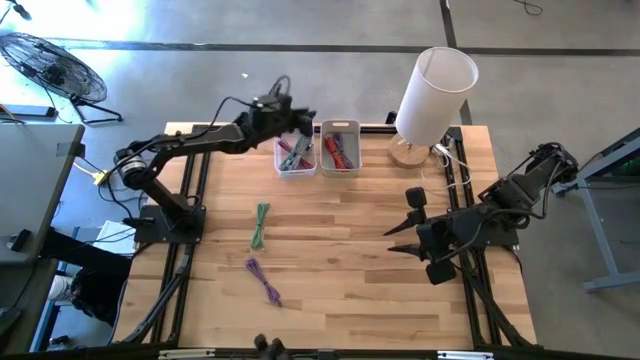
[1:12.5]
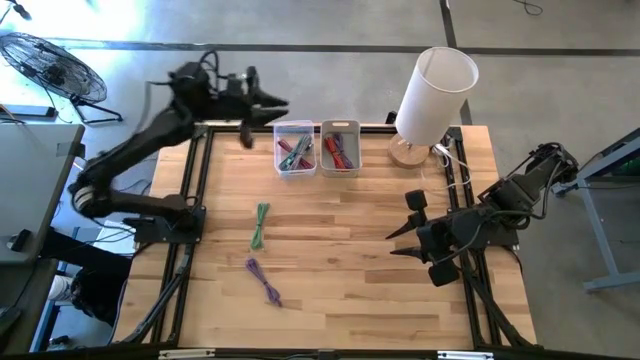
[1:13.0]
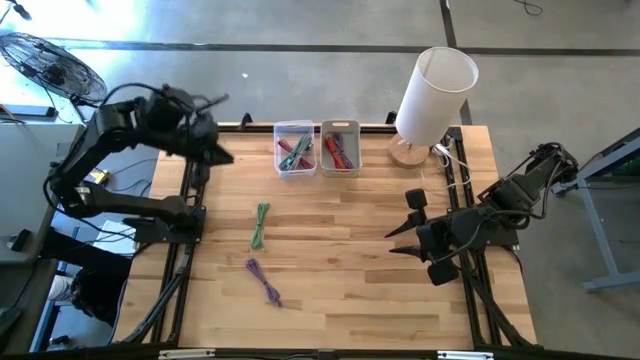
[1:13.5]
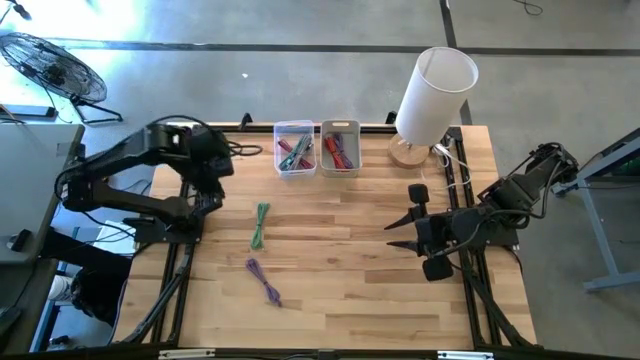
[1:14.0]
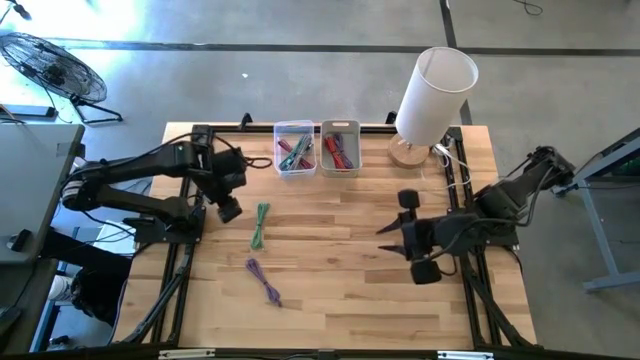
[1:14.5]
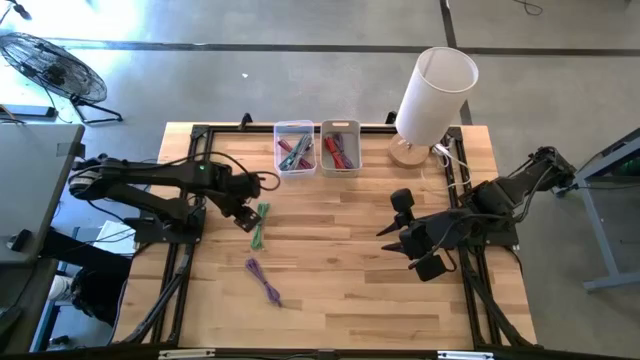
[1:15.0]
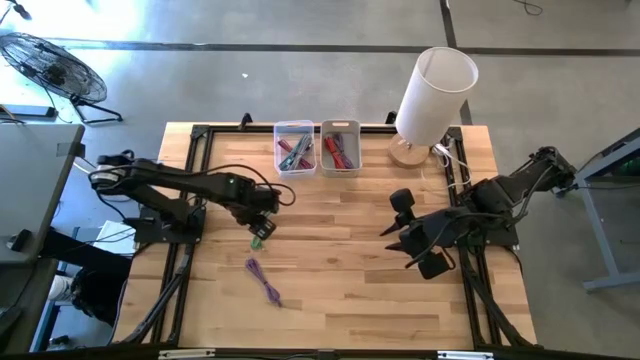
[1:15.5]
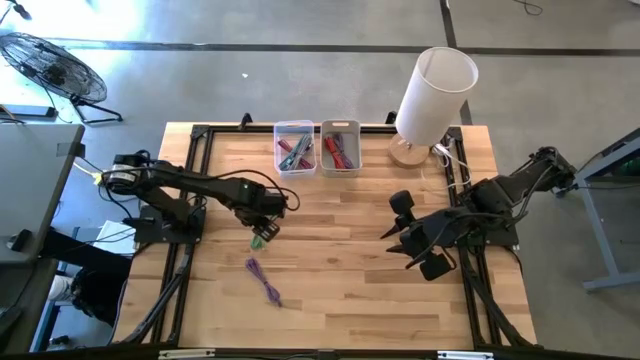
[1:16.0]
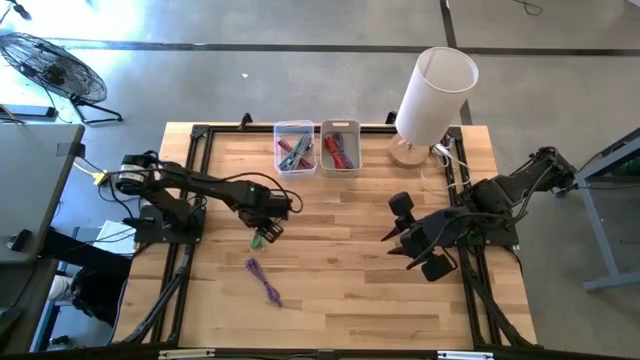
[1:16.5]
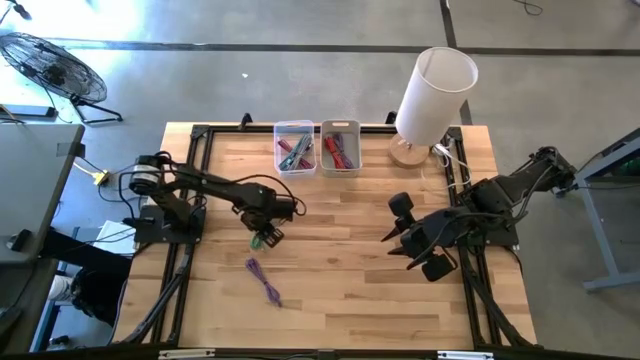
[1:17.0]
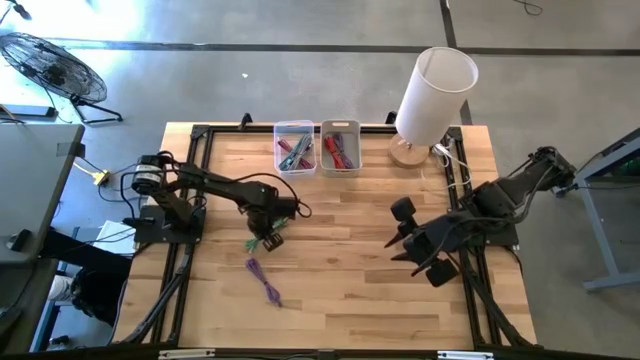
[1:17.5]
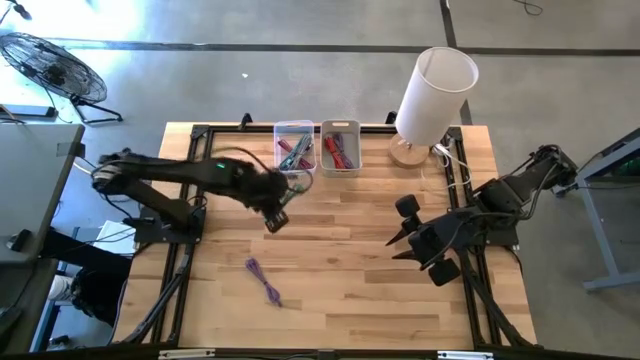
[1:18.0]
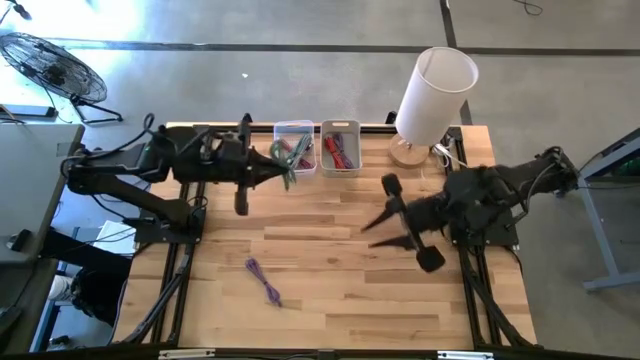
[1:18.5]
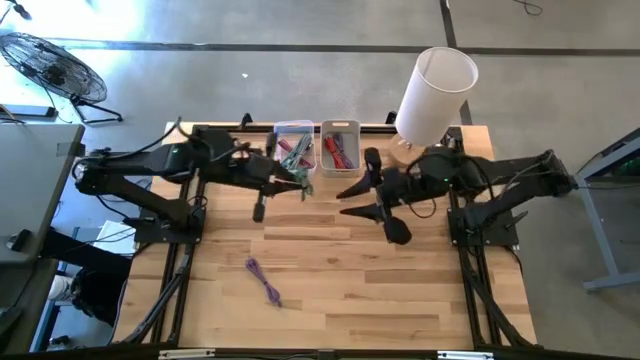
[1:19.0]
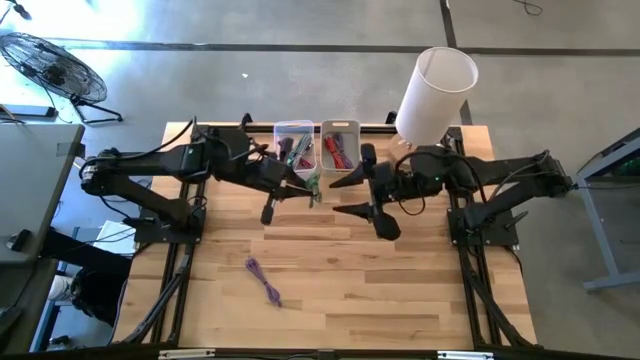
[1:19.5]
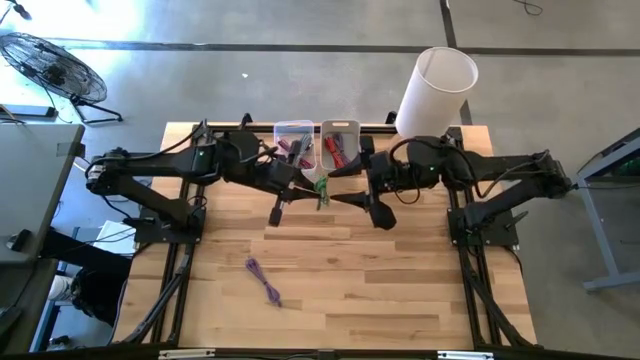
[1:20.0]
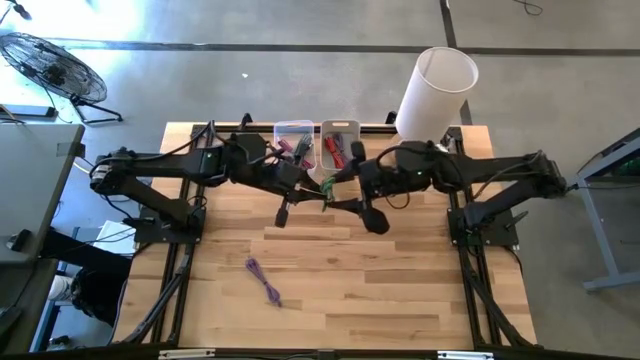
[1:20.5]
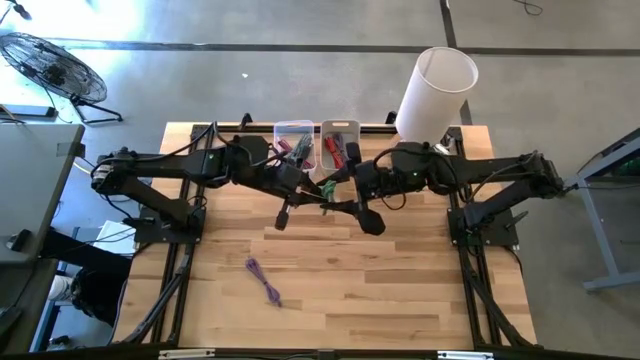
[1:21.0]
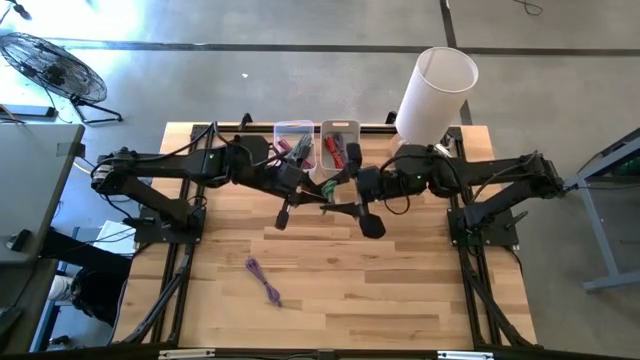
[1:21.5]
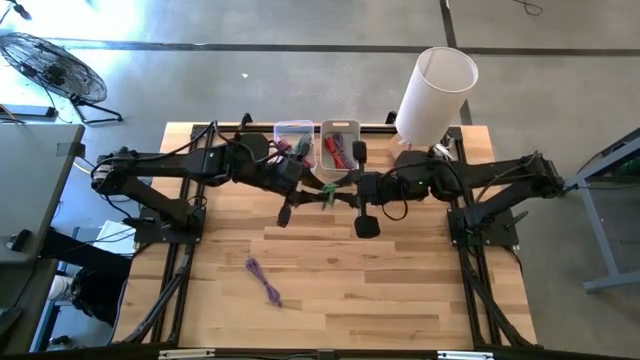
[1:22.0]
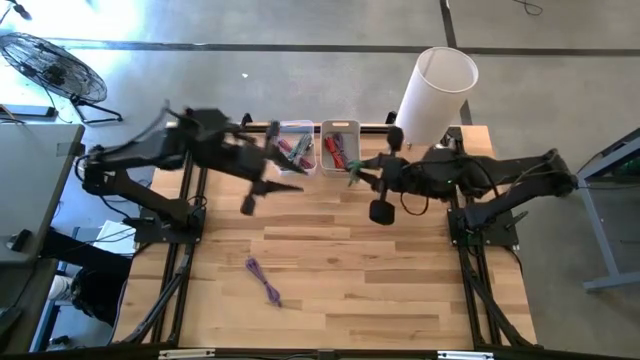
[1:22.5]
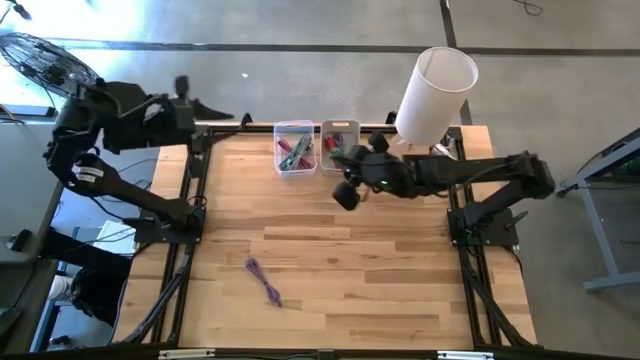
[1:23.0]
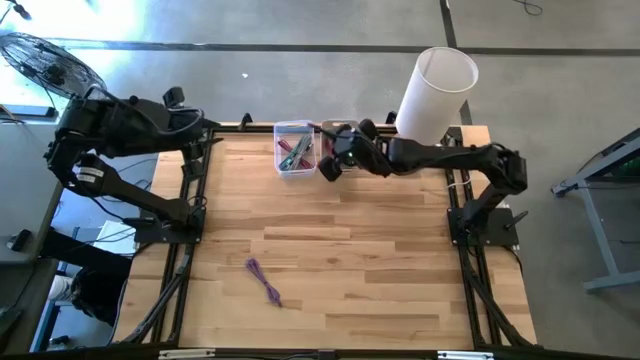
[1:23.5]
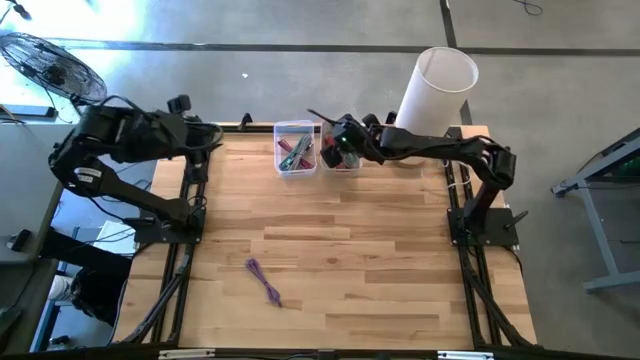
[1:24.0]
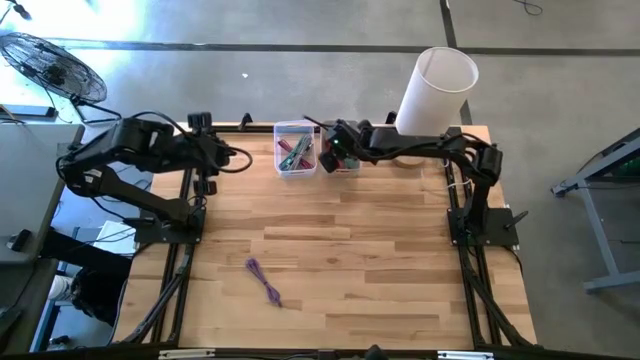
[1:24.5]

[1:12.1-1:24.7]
Task: Pick & Place USB Port
Put the green charger cable into the gray bin

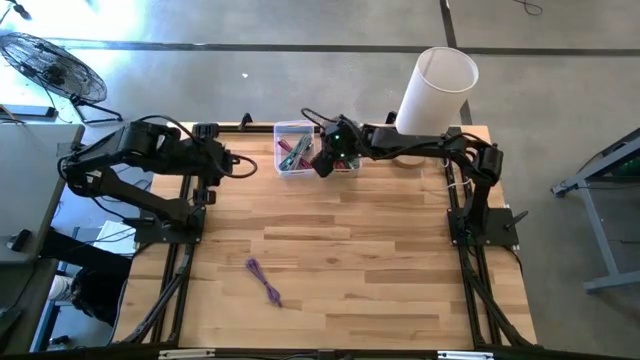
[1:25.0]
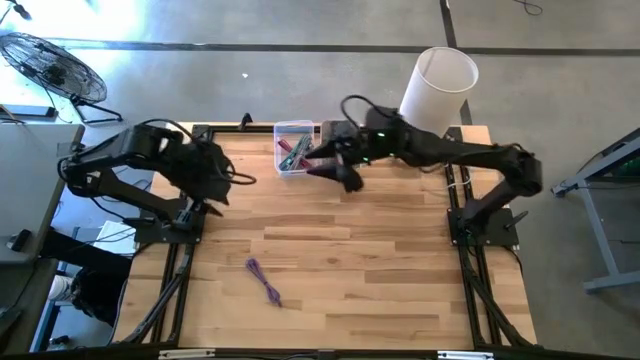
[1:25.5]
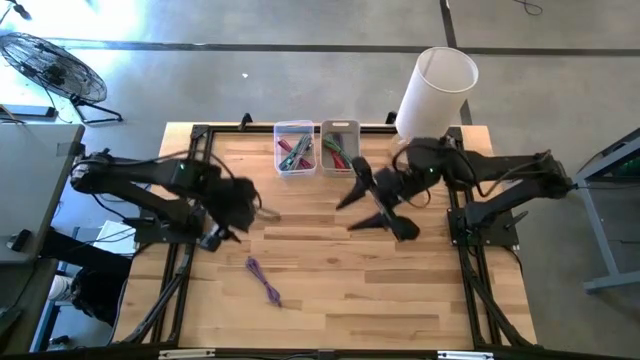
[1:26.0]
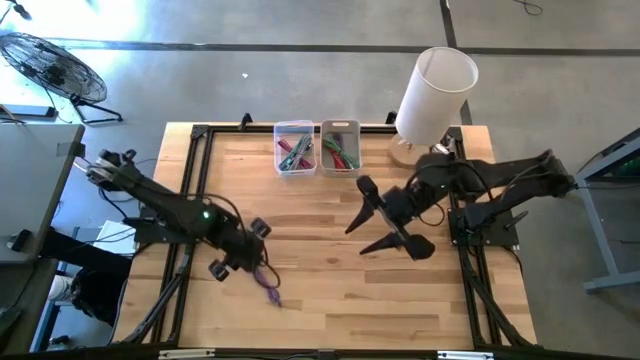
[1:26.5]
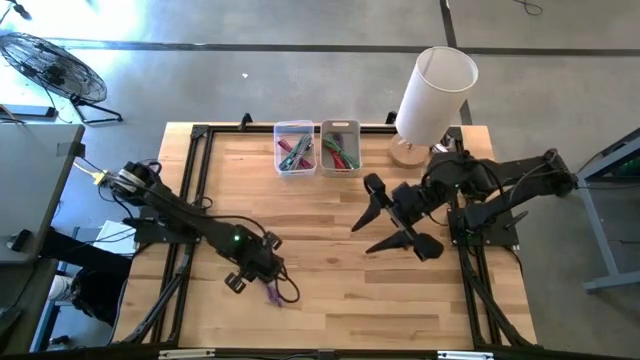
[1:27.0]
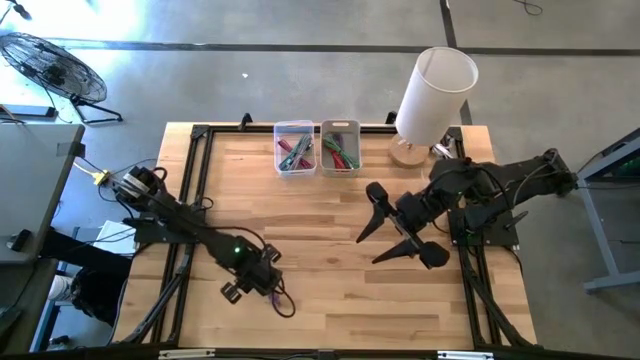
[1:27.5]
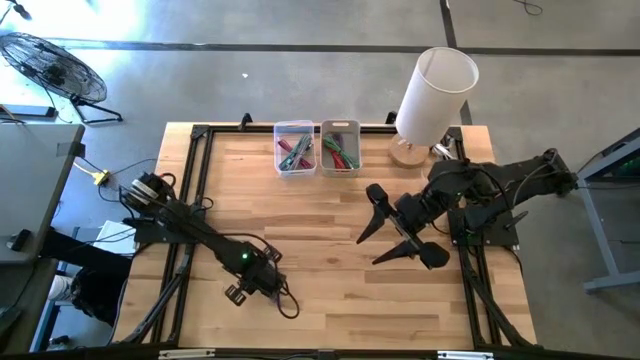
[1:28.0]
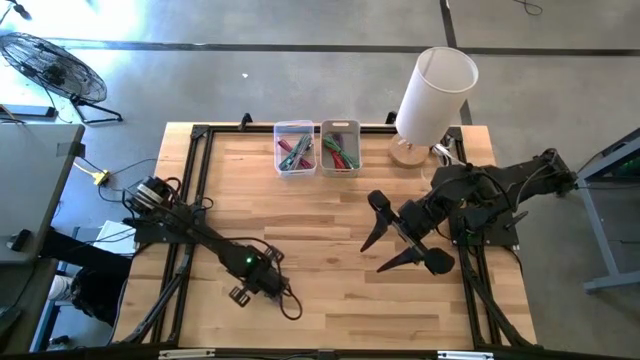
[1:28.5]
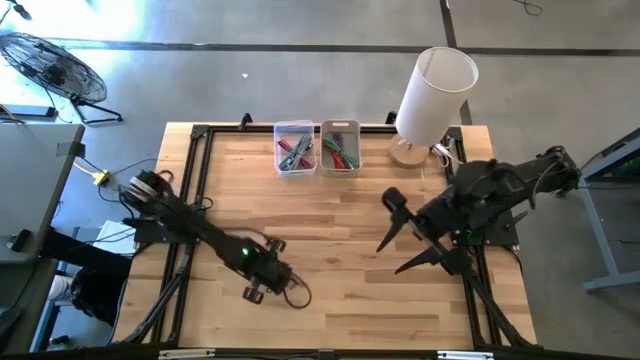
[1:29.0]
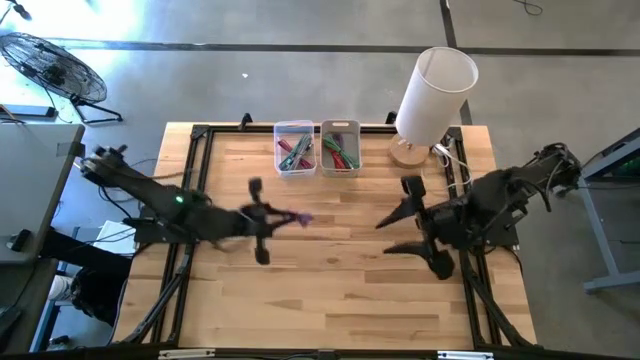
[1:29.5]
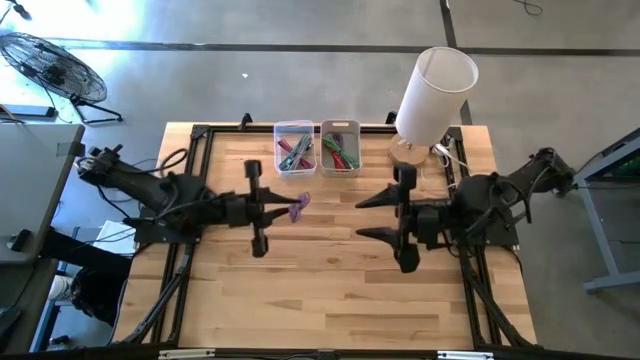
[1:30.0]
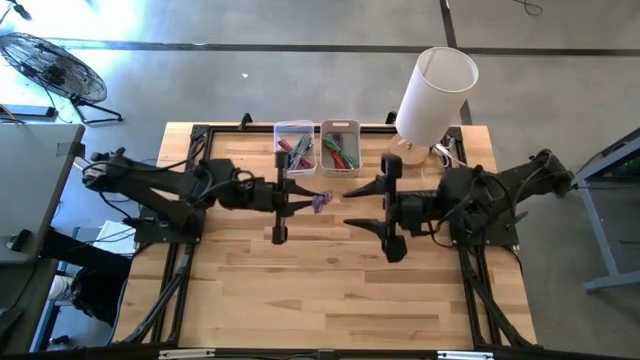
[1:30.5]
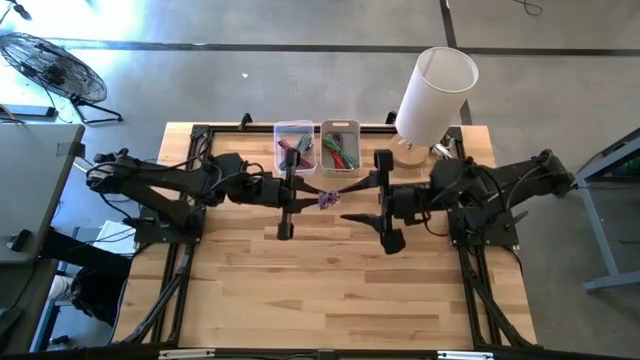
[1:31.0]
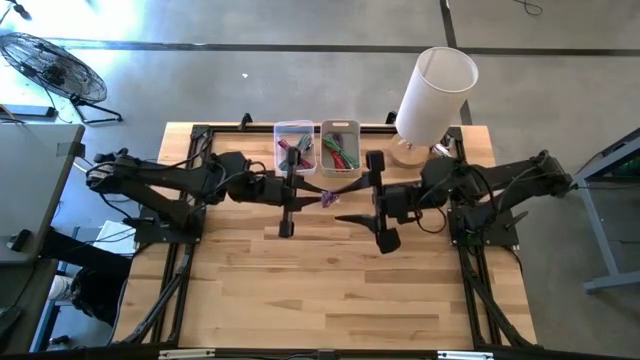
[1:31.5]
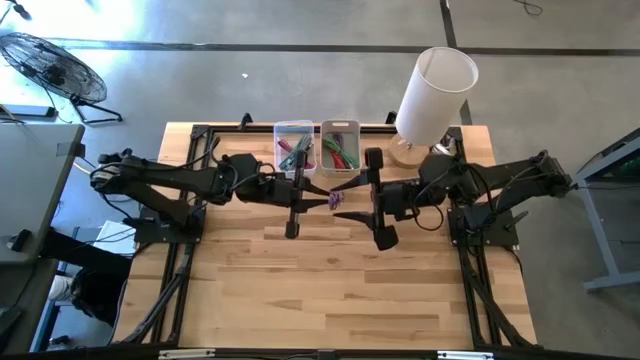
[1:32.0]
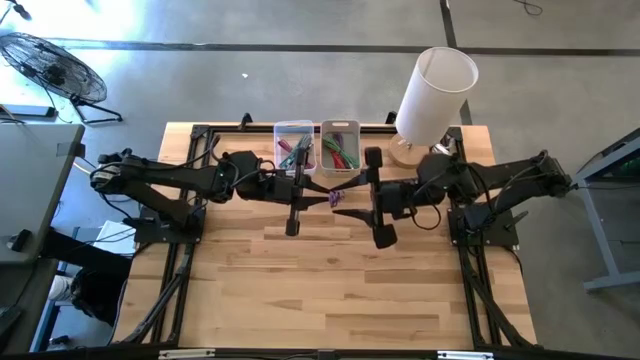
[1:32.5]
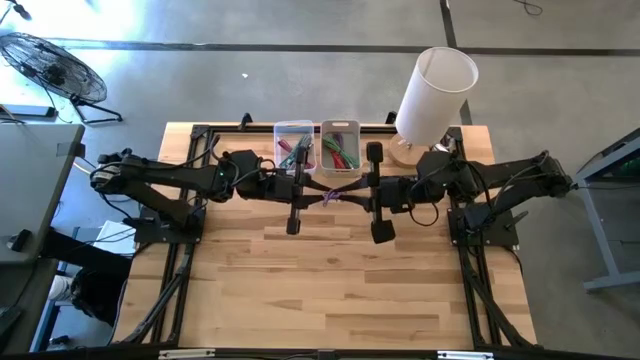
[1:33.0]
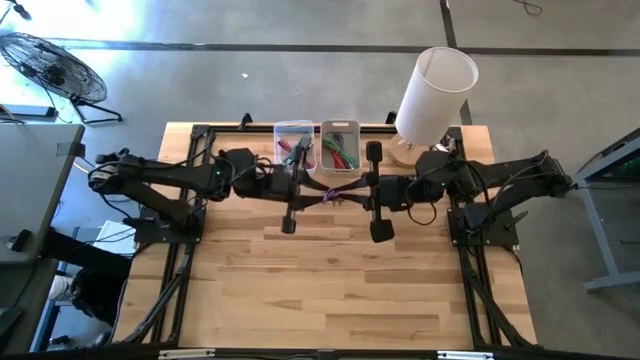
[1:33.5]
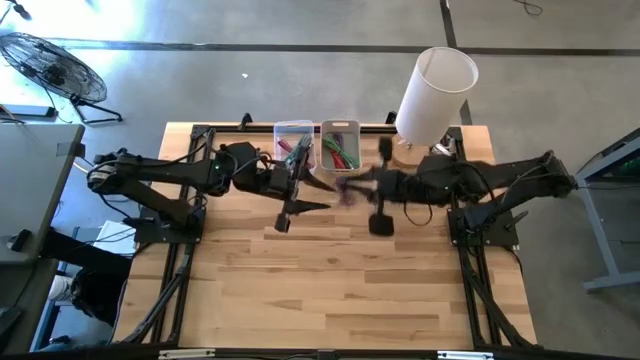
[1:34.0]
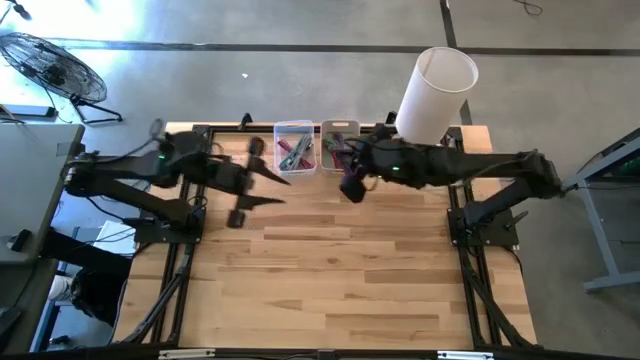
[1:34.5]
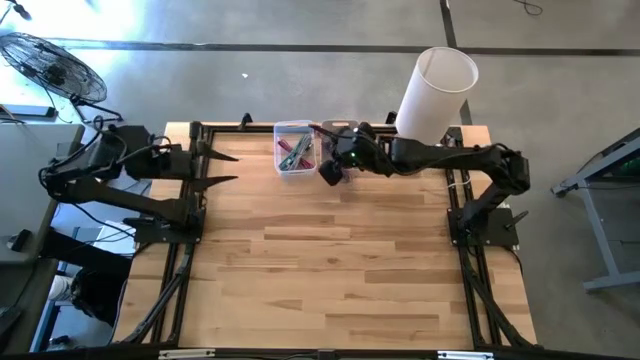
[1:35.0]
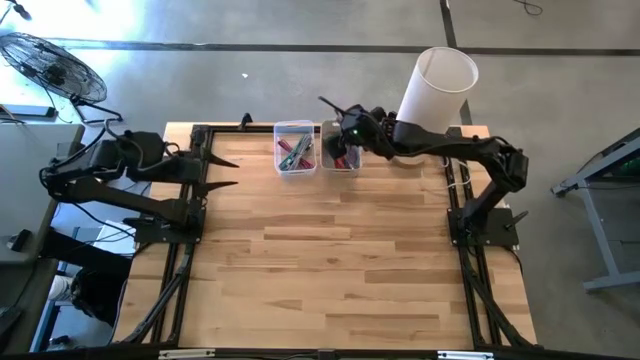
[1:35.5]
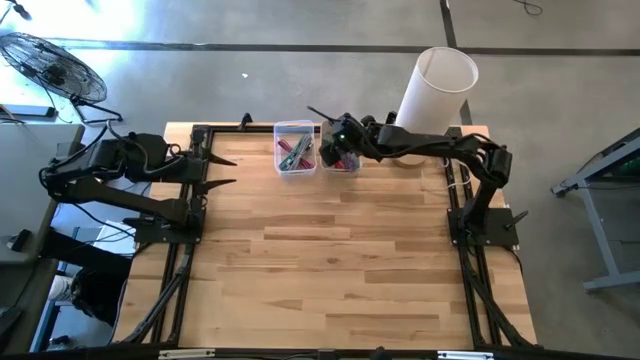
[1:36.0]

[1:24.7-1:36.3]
Put the violet charger cable into the gray bin
